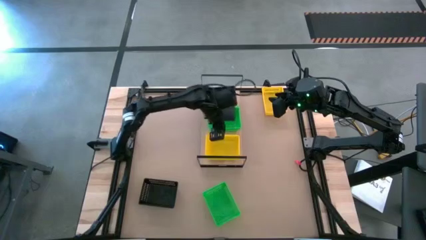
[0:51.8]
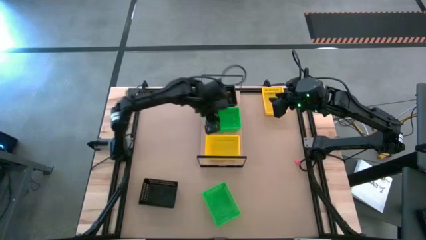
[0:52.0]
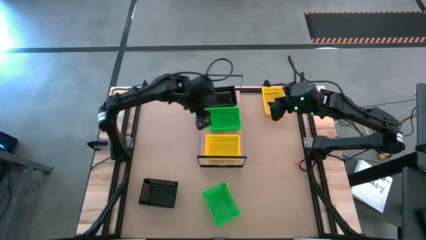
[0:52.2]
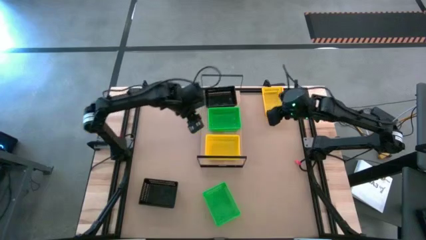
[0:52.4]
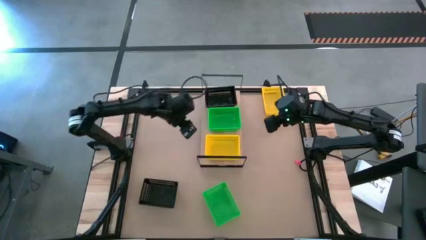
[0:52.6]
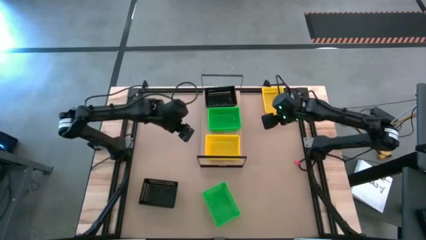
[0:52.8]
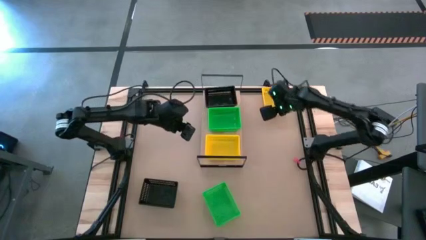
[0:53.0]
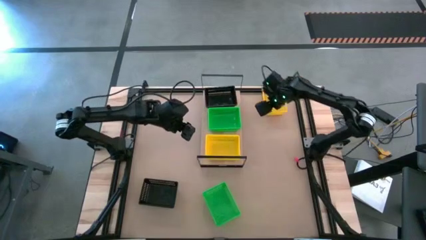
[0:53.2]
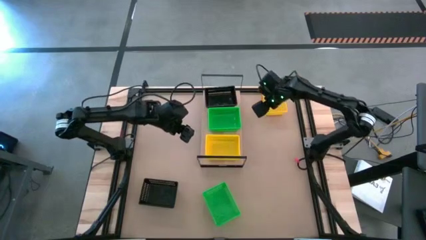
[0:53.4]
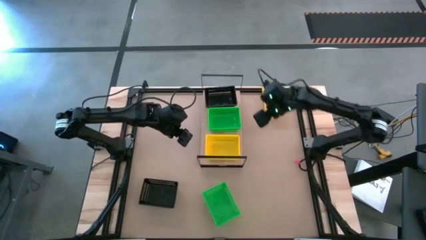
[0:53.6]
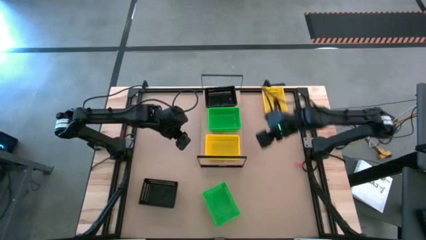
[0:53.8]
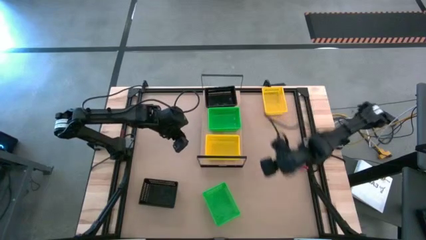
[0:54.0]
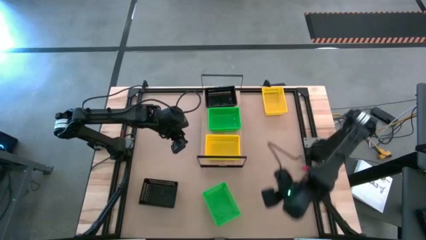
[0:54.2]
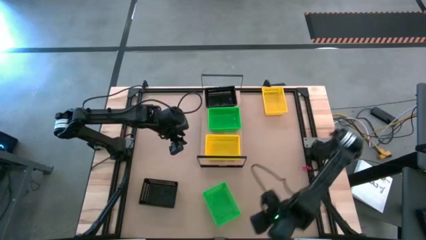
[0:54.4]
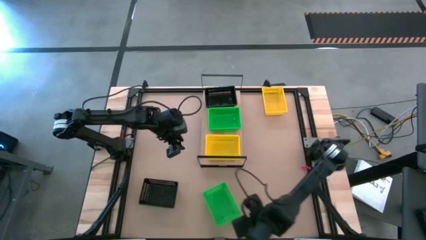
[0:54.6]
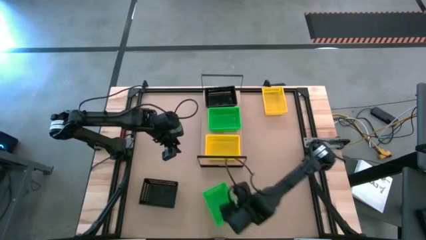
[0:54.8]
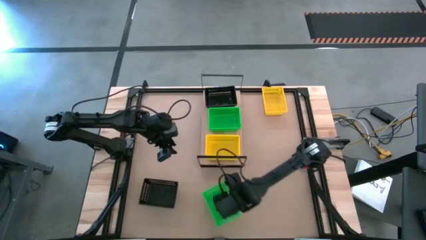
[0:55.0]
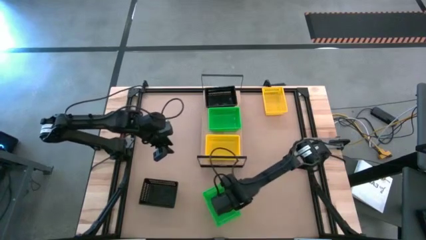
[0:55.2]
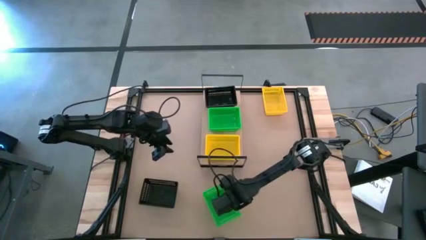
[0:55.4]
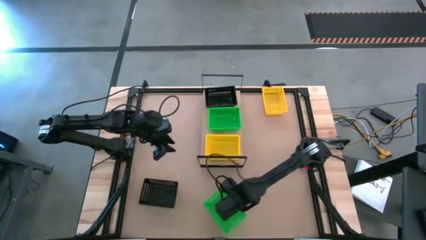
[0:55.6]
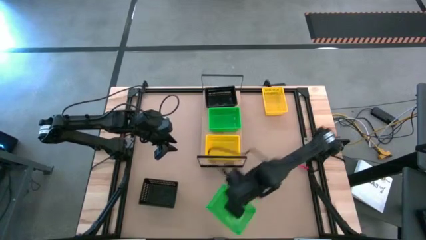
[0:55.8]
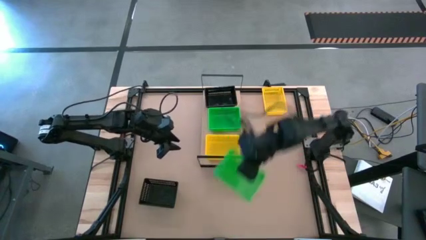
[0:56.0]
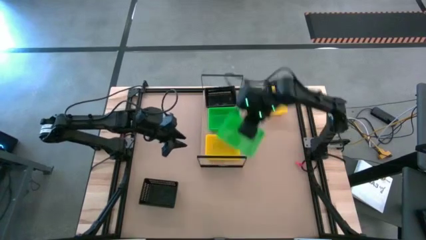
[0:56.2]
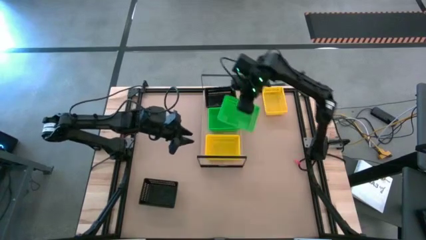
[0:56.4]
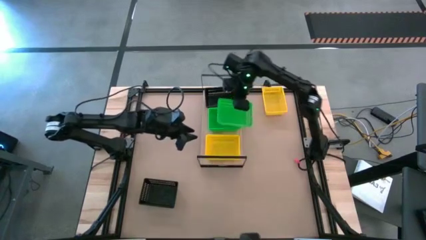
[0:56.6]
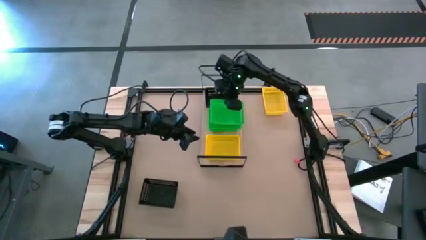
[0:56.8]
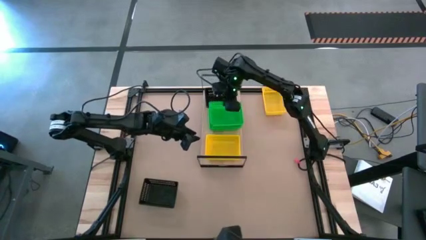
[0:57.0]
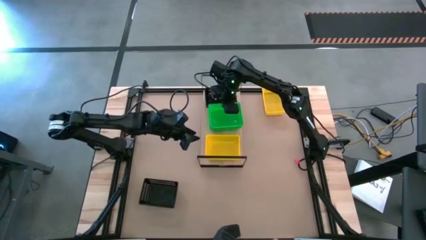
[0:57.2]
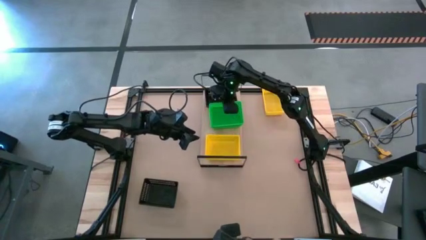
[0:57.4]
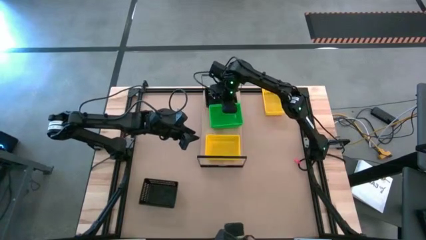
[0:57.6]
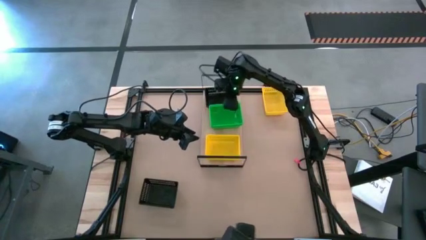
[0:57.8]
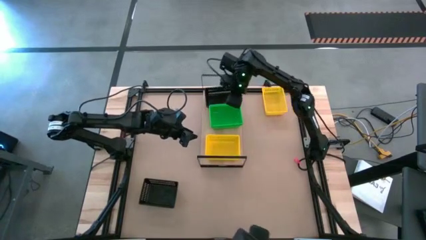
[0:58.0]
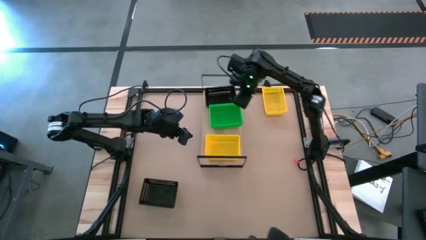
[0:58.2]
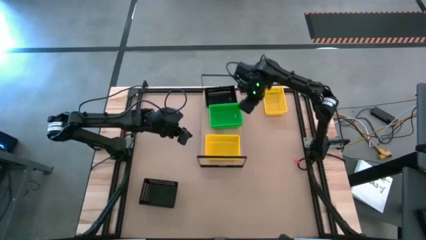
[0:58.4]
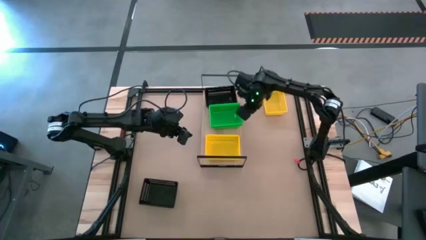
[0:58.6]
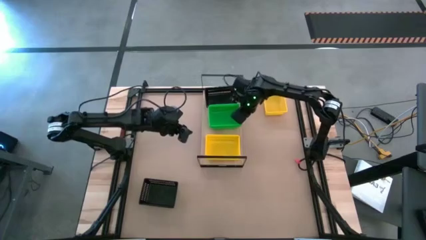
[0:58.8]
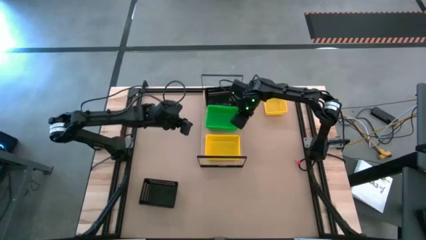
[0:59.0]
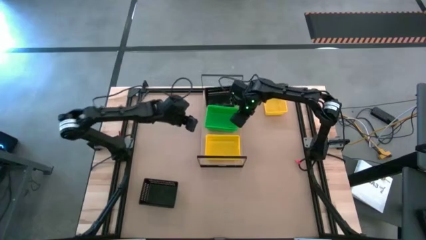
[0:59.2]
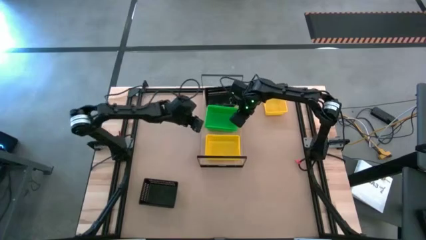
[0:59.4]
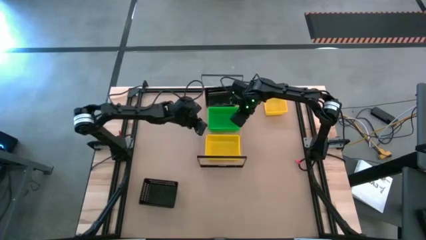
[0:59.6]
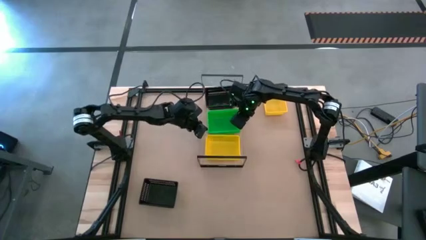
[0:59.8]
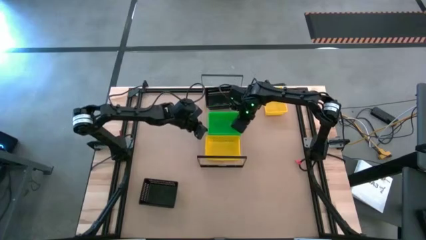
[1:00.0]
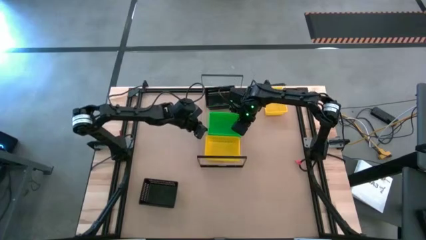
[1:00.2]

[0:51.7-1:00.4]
Task: Stack baskets on shelf by color
Stack the green bin on top of the green bins on the shelf

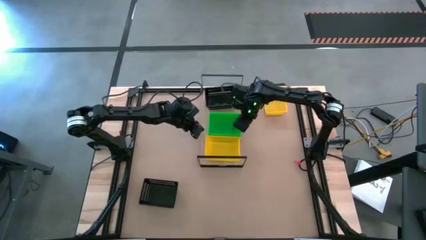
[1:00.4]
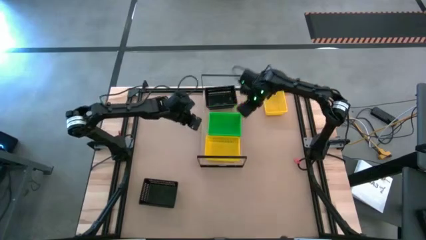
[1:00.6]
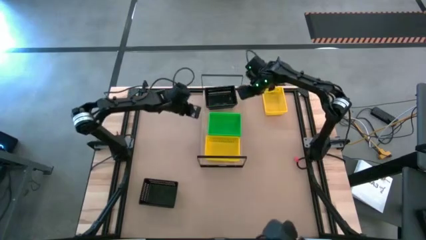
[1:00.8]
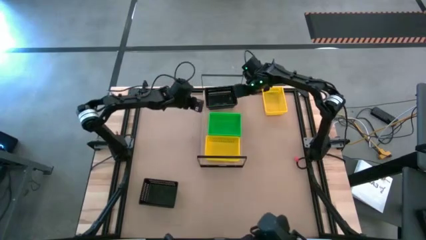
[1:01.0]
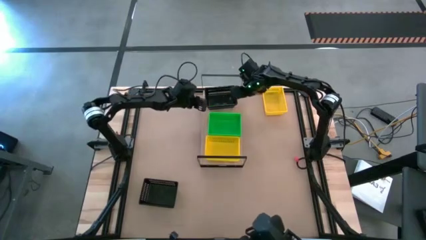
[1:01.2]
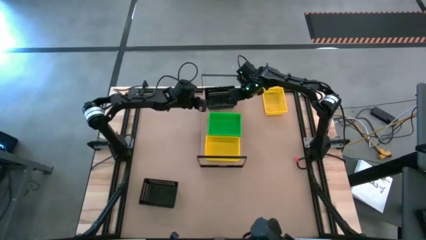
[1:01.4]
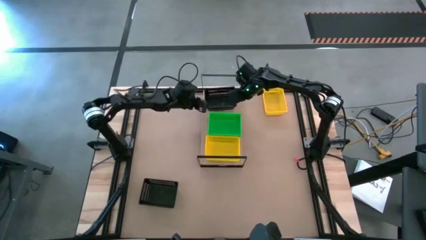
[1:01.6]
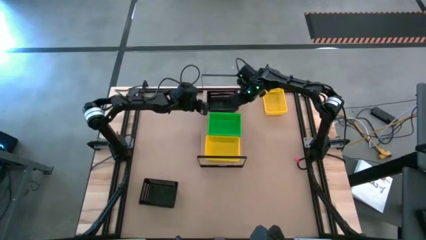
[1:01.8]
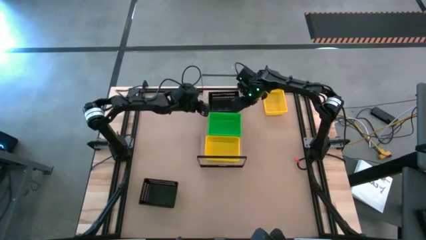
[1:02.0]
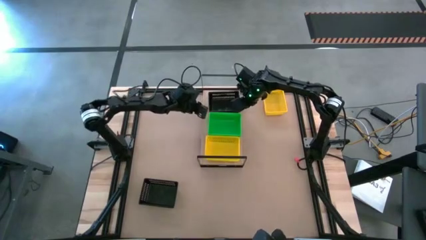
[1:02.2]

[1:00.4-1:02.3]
Adjust the black bins

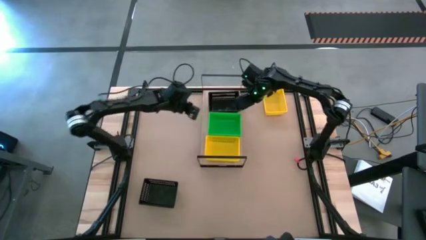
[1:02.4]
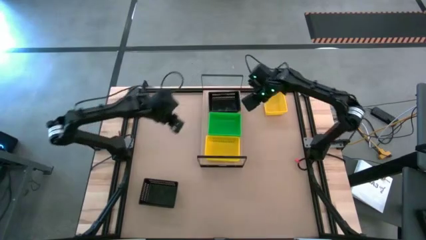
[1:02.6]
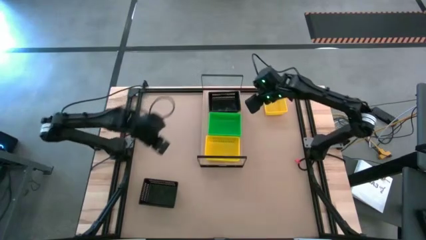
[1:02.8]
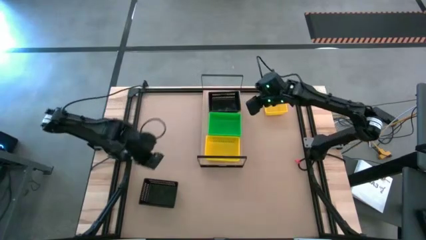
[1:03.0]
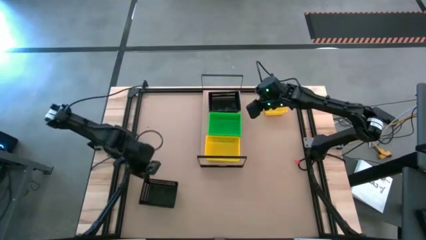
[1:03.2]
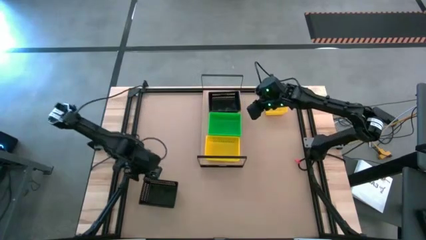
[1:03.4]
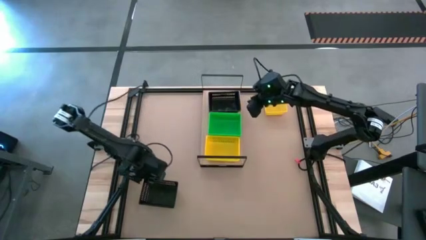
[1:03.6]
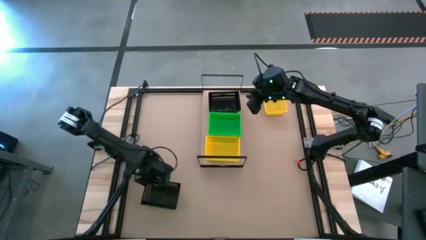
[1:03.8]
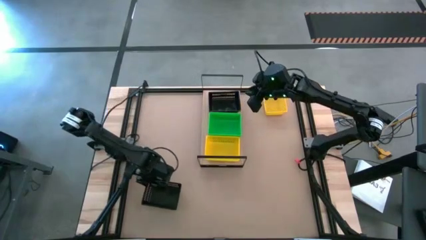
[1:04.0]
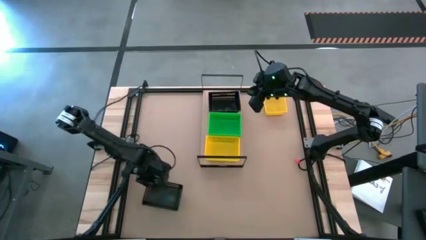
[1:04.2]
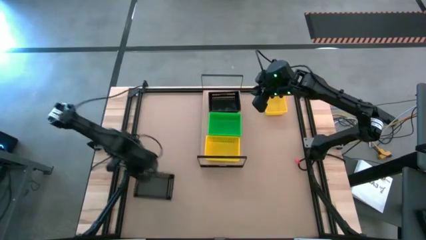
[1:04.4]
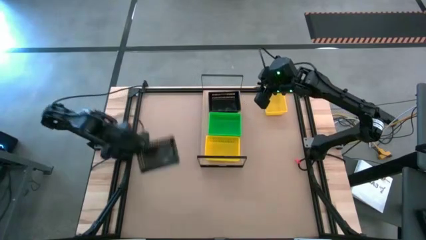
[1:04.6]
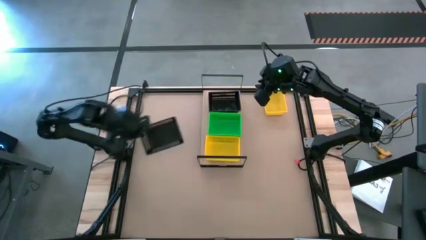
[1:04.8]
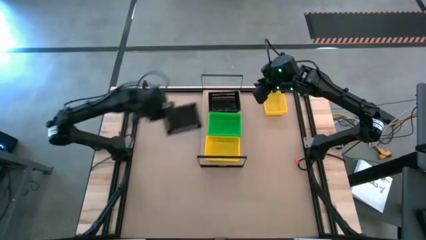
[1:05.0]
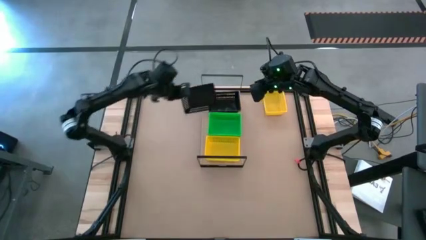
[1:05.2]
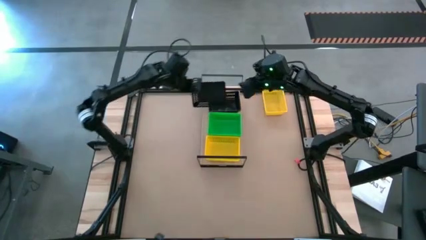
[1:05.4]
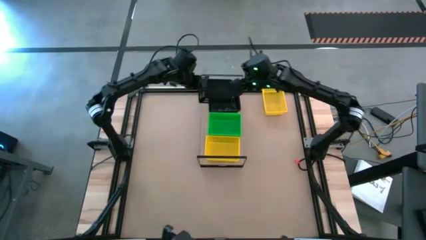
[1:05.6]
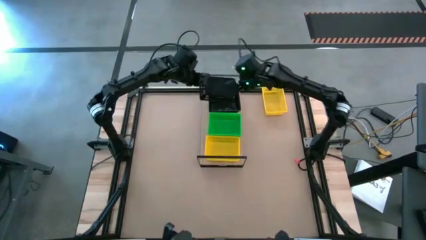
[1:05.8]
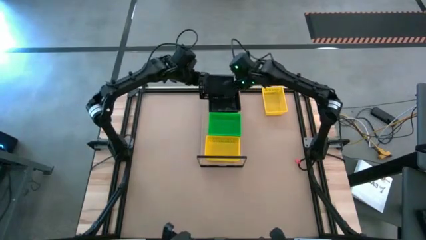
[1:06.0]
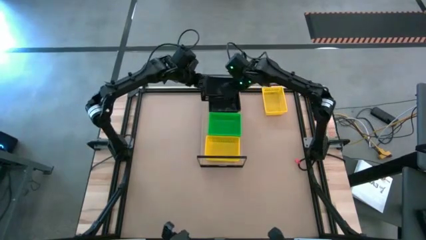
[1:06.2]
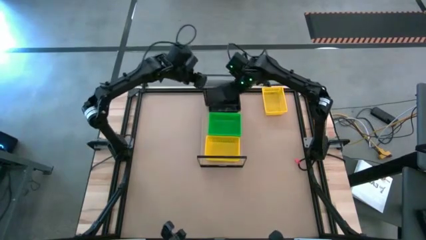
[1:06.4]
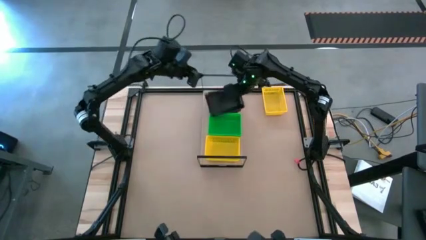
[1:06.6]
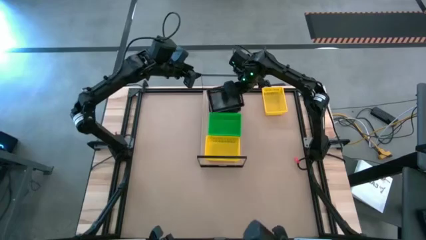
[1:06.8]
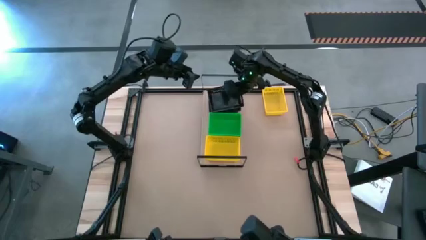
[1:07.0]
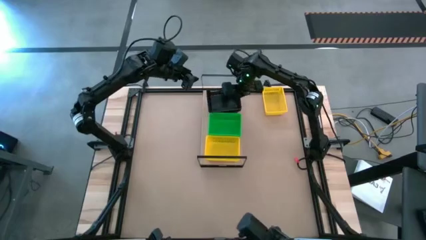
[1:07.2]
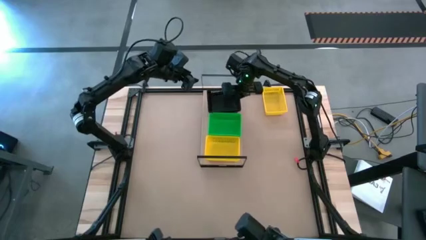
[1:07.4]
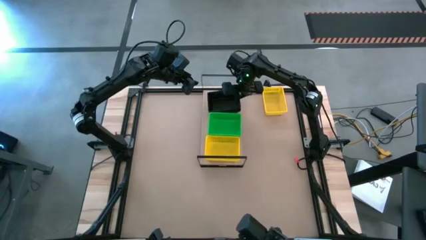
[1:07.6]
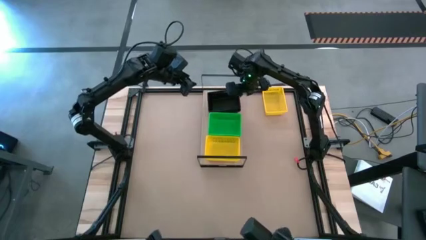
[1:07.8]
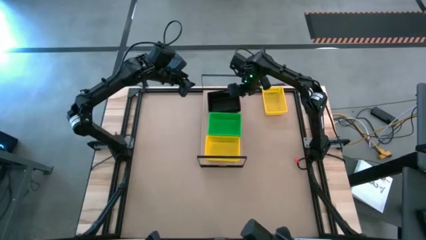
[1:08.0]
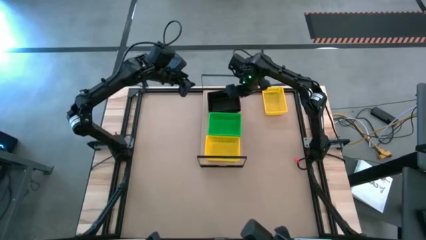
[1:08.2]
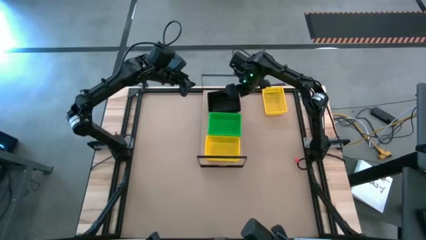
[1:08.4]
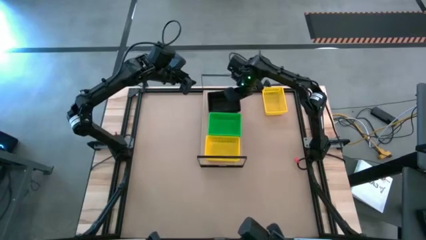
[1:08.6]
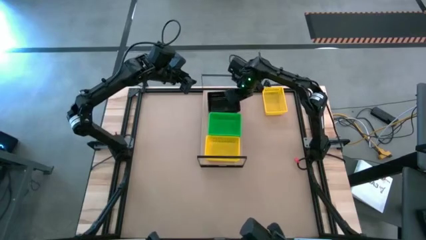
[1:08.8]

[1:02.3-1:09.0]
Stack the black bin on top of the black bins on the shelf
